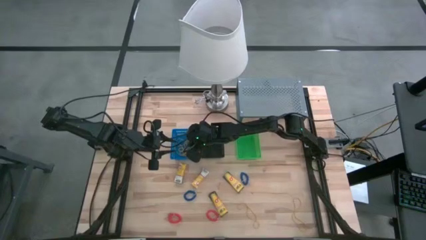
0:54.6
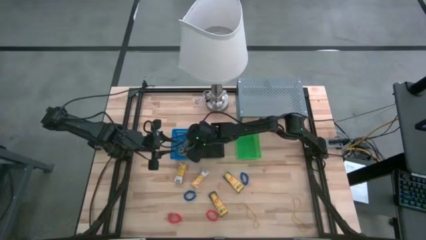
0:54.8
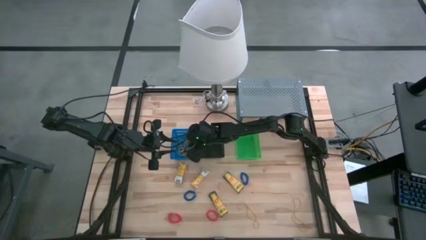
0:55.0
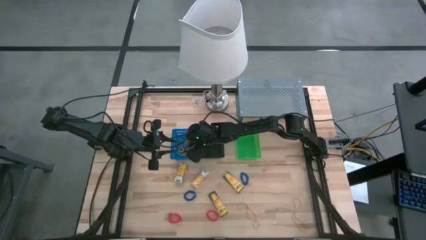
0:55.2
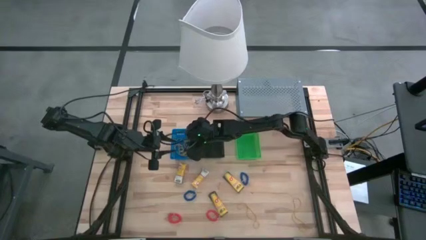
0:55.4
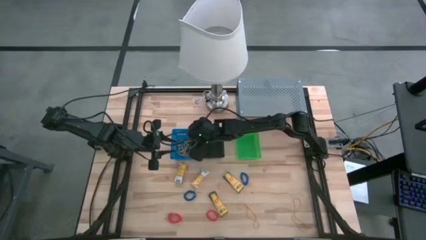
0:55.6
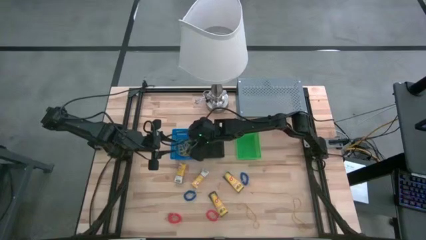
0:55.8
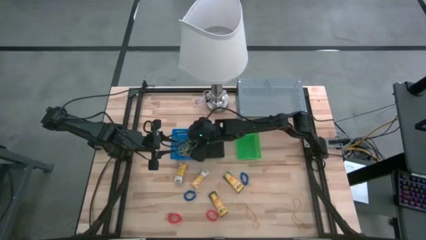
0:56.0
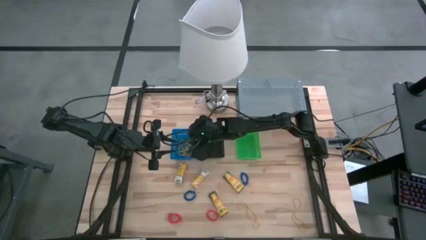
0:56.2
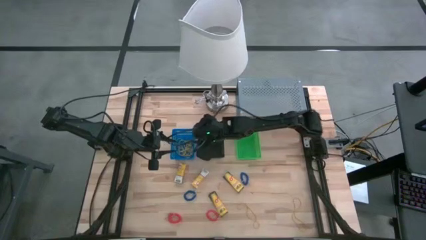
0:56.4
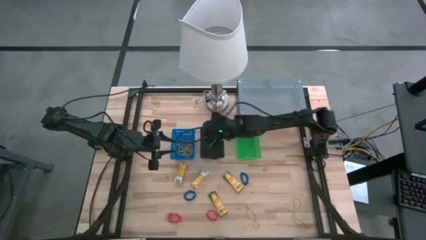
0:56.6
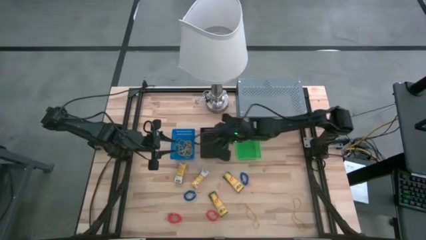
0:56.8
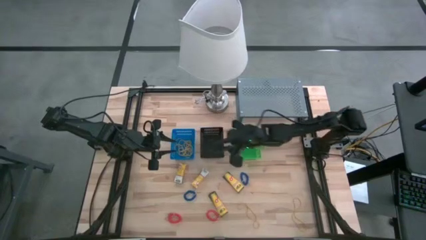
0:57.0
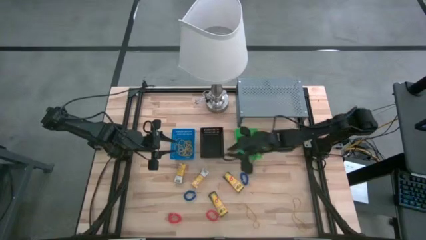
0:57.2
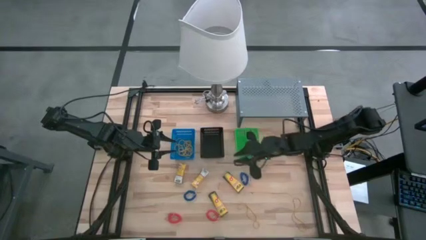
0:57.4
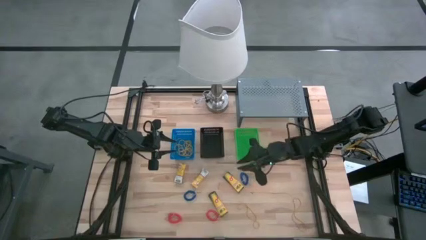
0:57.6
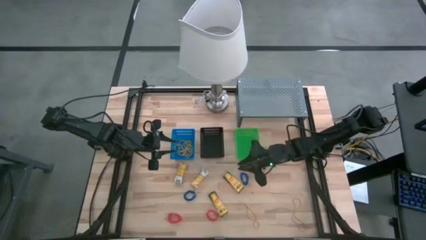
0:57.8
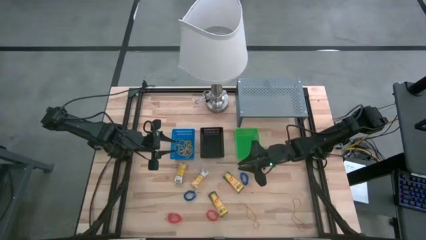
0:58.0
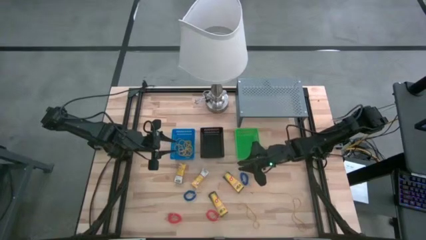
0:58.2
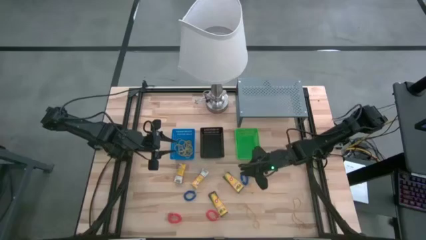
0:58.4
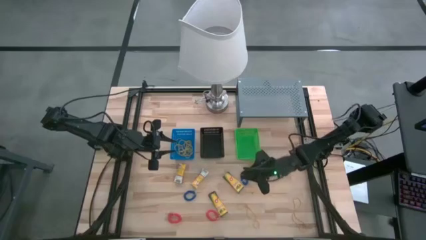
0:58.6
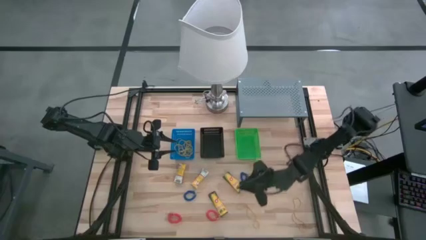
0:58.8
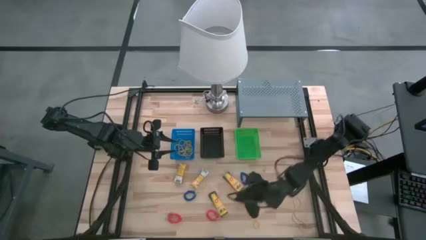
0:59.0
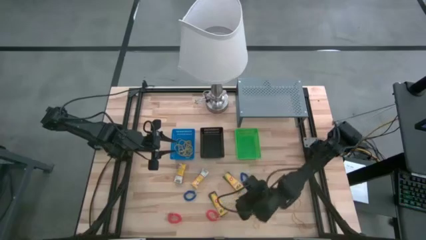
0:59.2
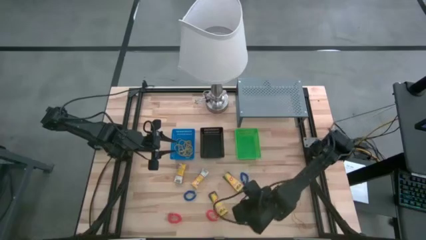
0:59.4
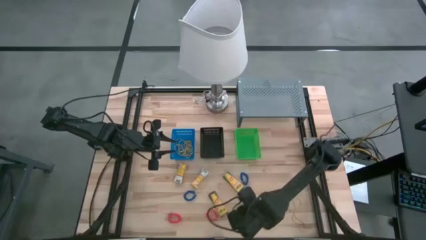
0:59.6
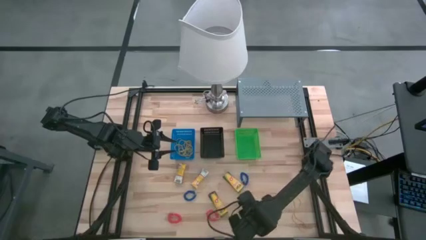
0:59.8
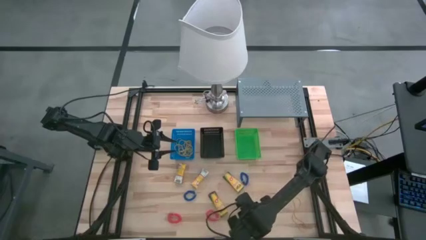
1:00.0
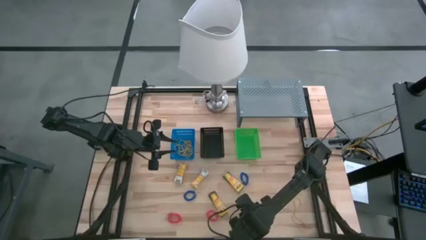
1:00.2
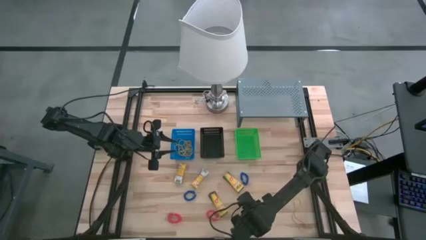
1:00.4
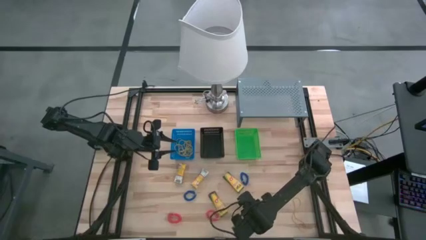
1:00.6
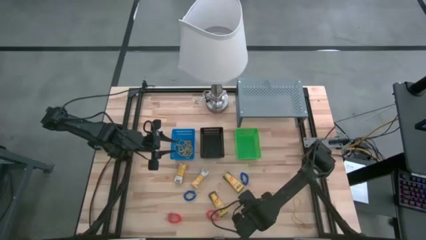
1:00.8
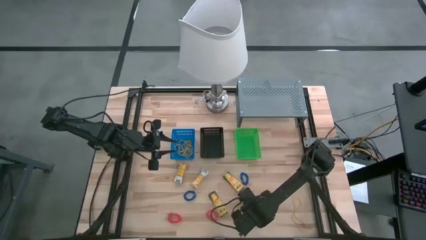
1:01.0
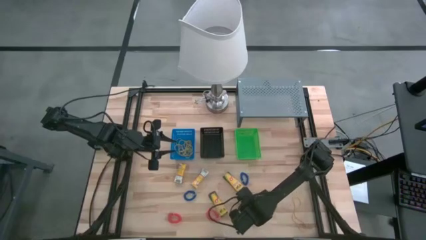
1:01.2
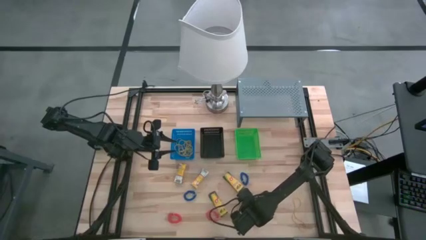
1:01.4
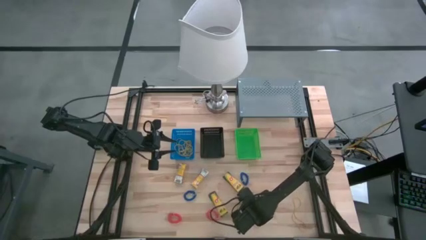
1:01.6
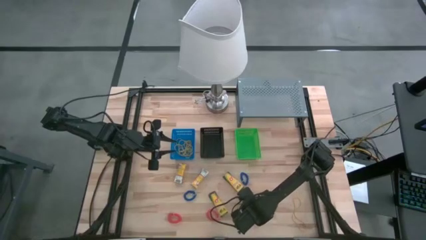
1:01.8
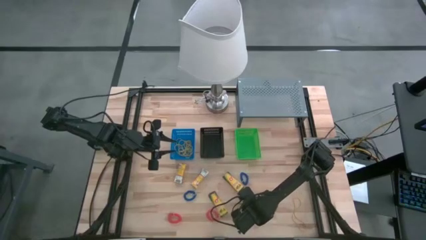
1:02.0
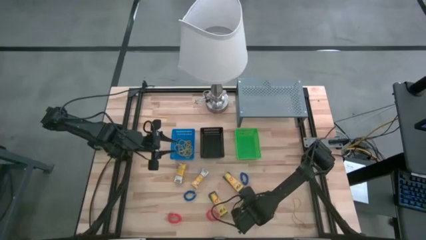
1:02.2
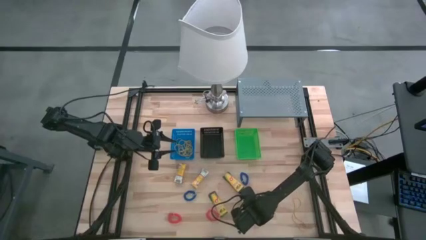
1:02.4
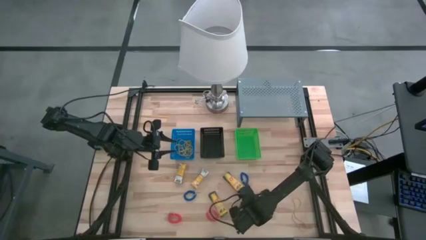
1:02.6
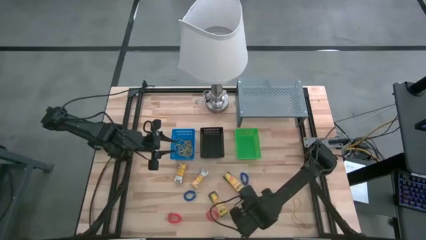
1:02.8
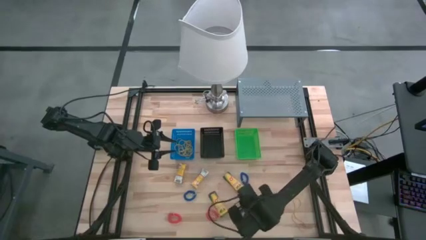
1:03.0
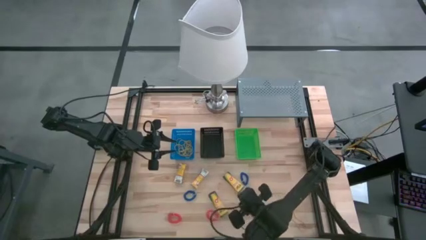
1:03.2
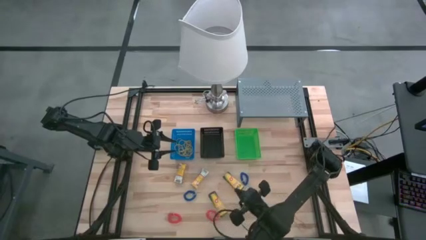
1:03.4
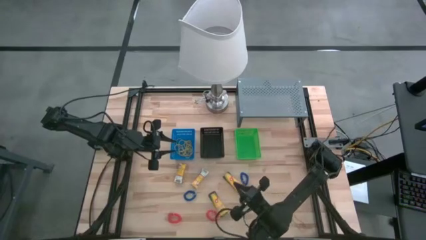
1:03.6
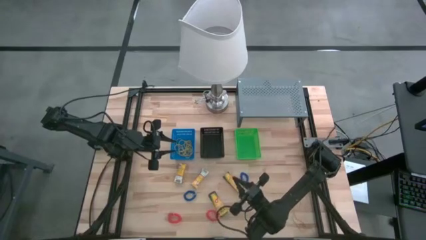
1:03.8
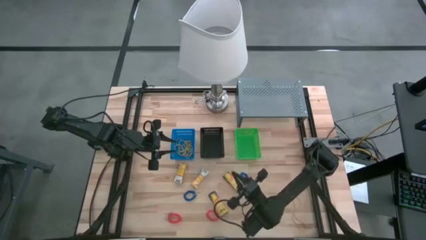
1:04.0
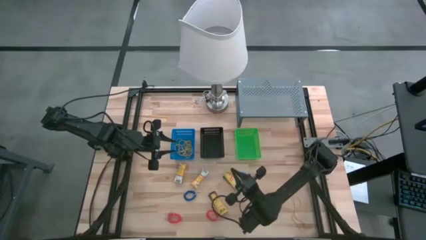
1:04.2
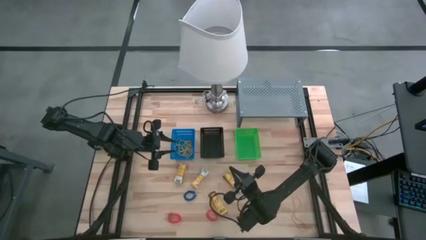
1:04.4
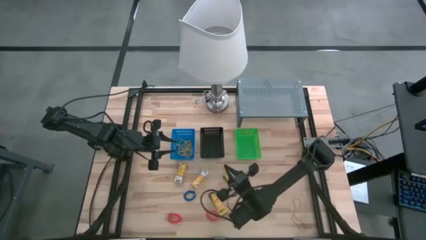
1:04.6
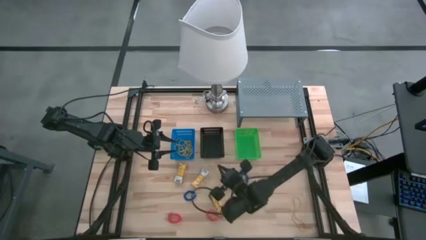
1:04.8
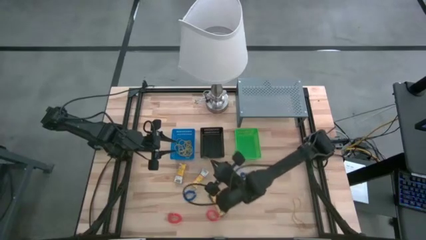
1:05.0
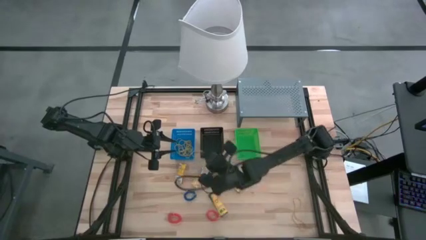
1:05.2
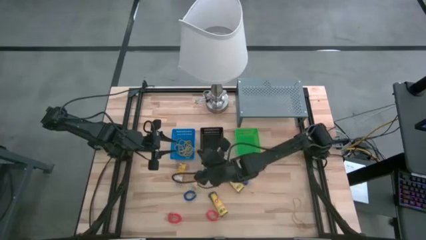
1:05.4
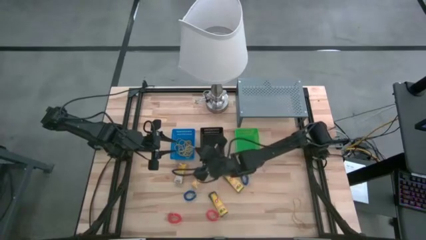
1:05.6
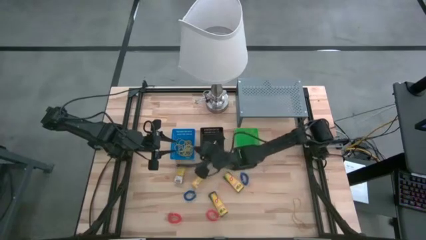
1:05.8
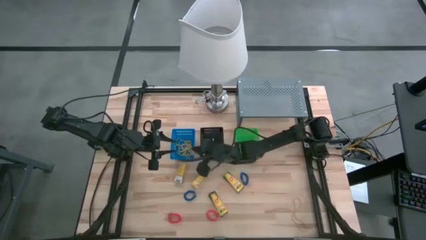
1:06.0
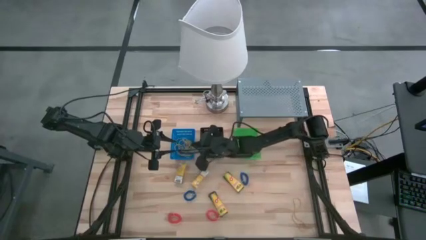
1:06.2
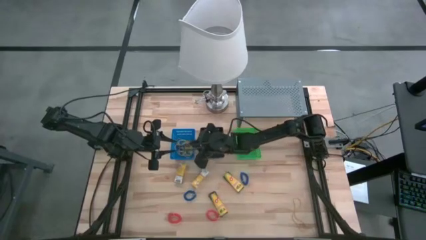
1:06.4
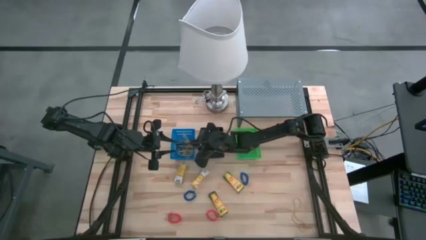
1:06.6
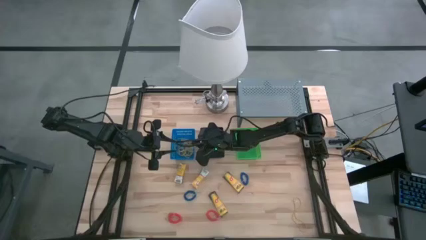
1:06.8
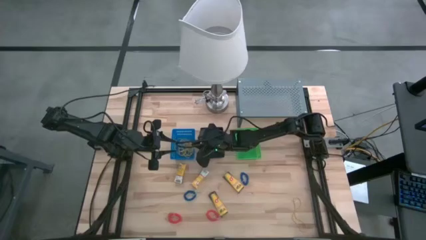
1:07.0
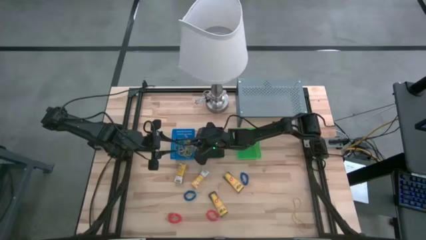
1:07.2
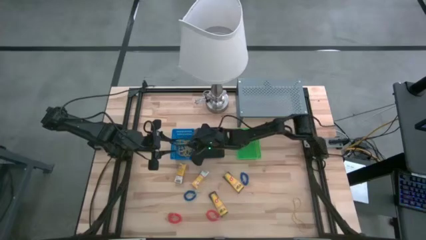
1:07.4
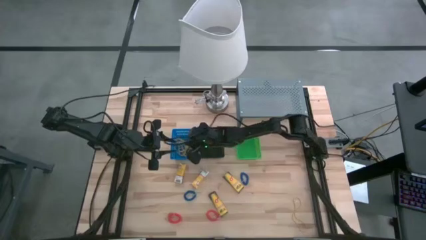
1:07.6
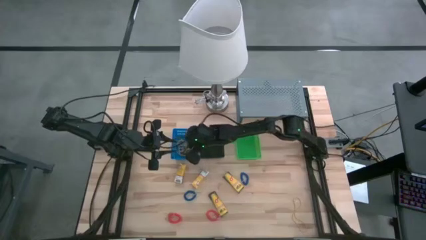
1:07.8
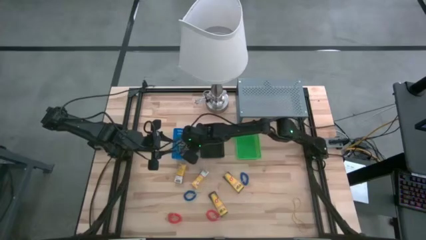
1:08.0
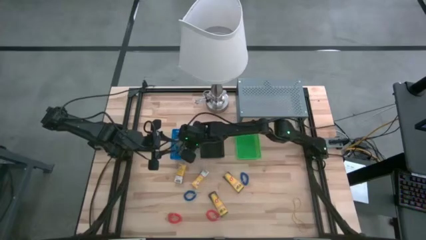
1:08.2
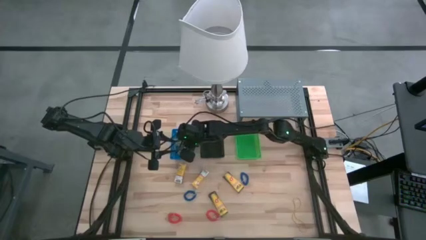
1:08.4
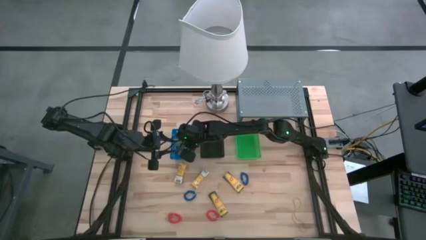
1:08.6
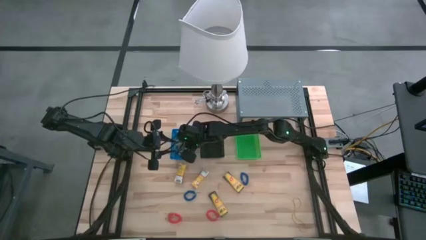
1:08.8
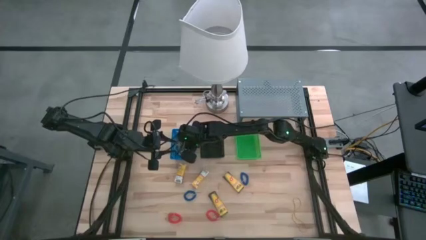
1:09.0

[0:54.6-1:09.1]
Task: Pick & Place Office Desk Supplies
Put the yellow rubber band into the blue bin

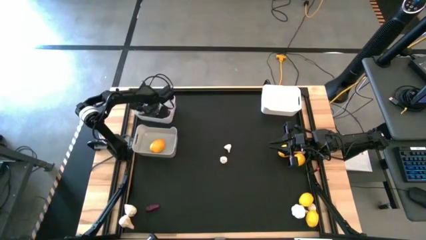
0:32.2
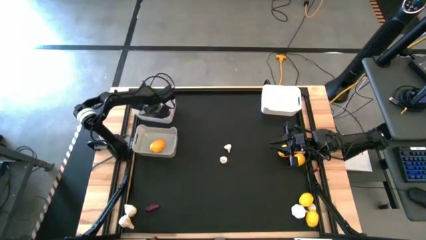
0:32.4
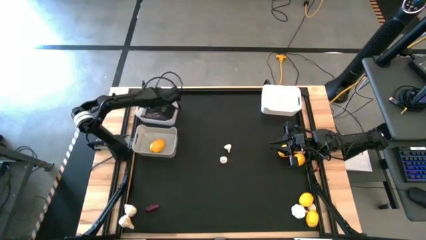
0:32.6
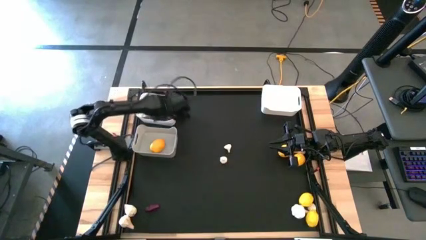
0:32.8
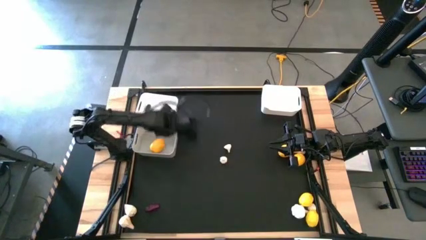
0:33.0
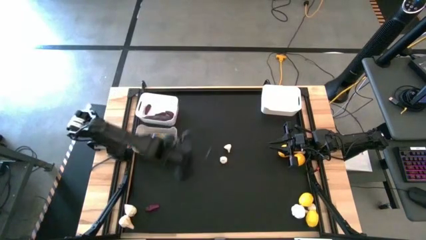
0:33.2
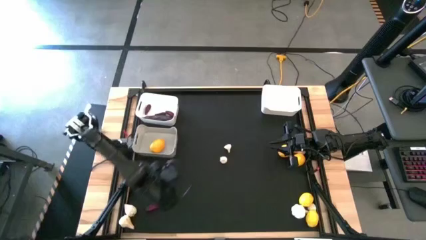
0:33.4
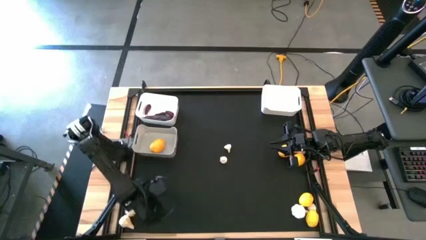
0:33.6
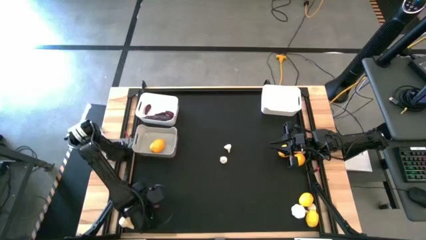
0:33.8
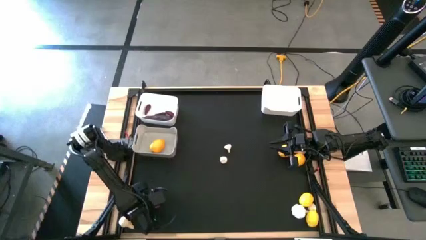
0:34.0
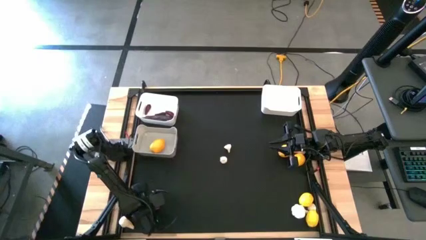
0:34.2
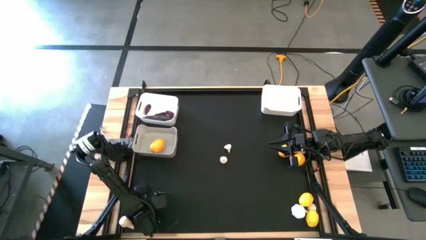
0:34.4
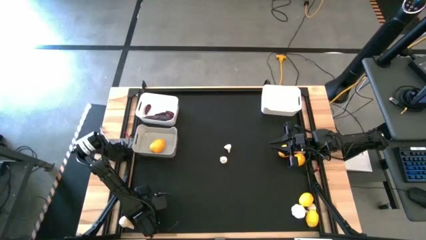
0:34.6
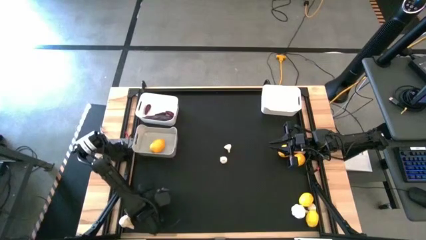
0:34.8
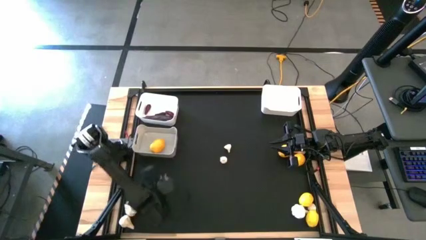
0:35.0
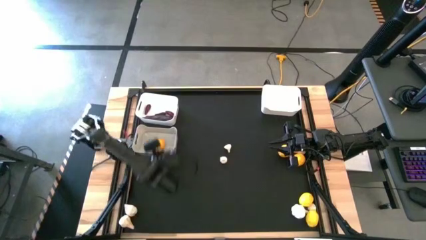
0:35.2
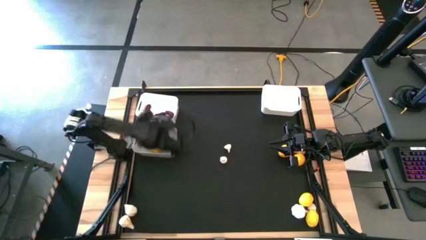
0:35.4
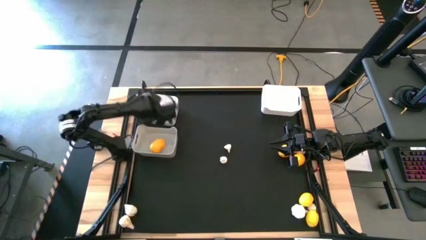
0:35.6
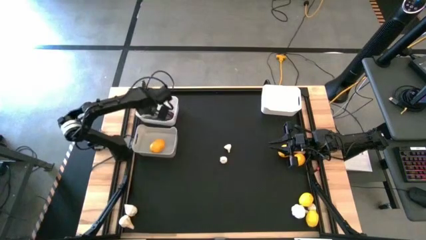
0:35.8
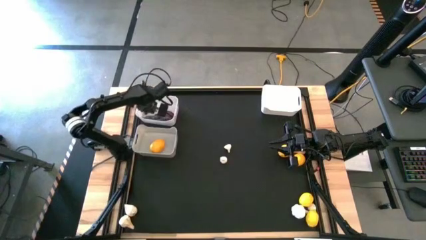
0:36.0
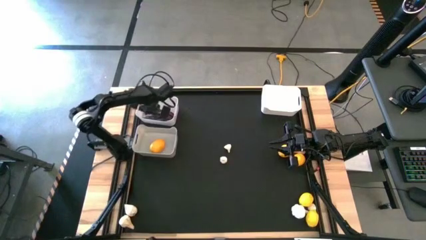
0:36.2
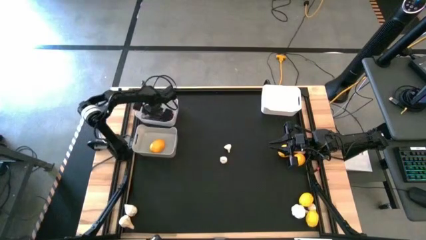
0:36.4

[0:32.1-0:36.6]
Task: Sort produce into baskets
Put the eggplant into the left white bin
